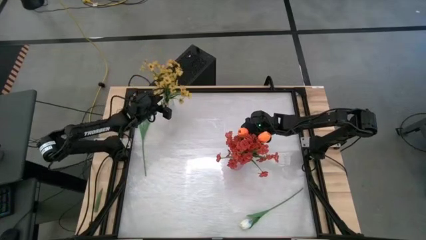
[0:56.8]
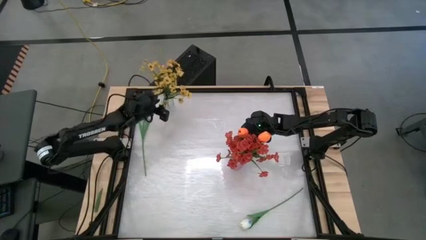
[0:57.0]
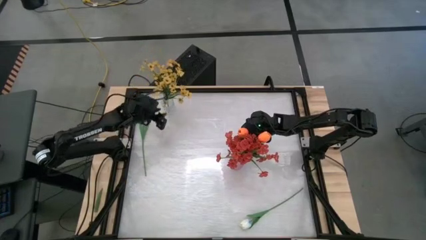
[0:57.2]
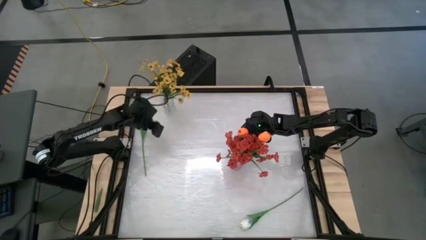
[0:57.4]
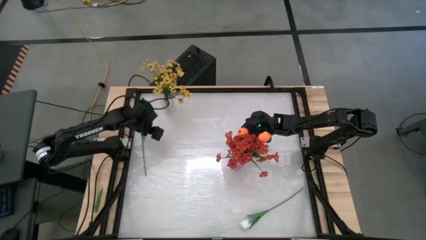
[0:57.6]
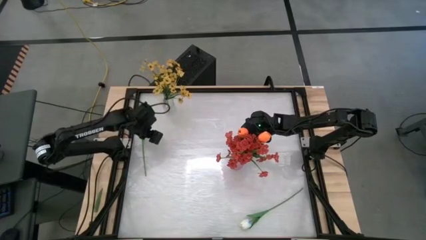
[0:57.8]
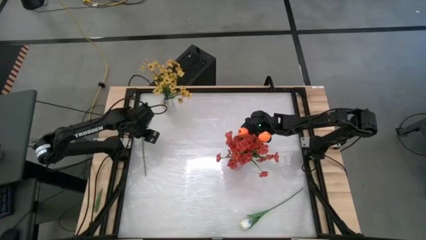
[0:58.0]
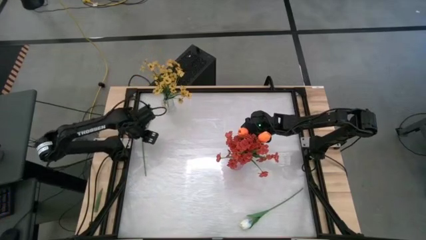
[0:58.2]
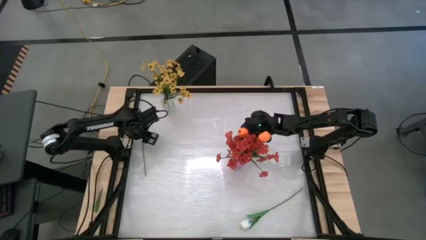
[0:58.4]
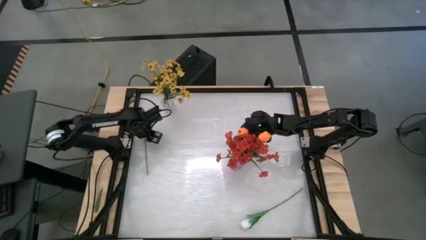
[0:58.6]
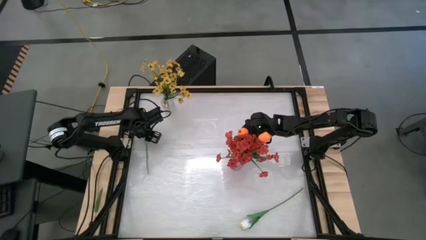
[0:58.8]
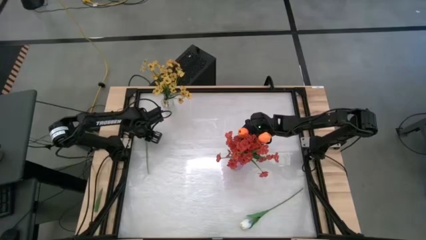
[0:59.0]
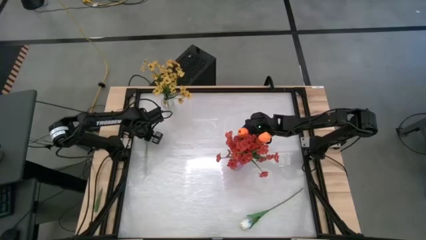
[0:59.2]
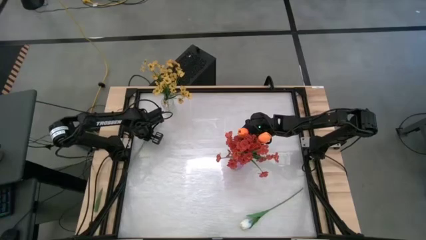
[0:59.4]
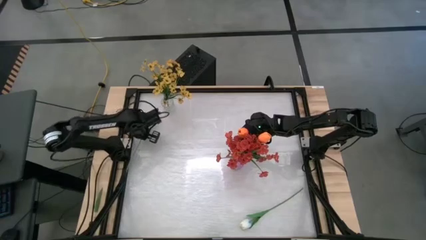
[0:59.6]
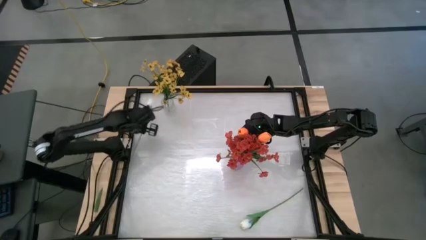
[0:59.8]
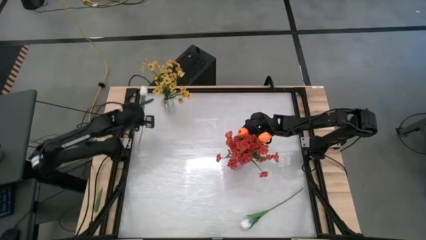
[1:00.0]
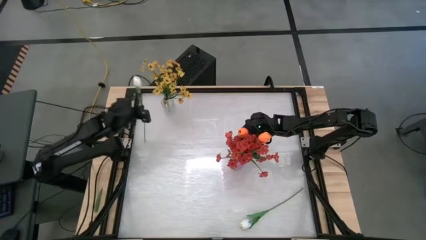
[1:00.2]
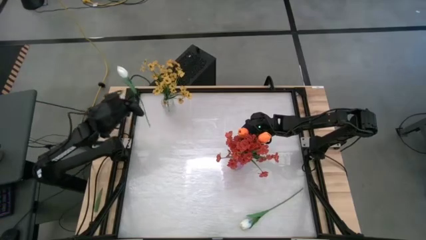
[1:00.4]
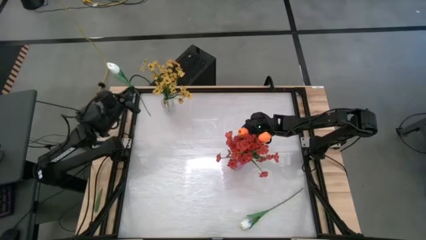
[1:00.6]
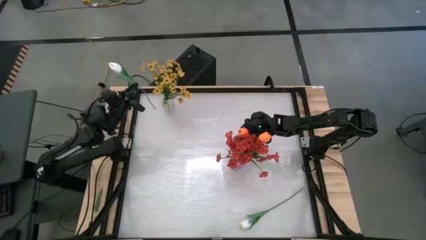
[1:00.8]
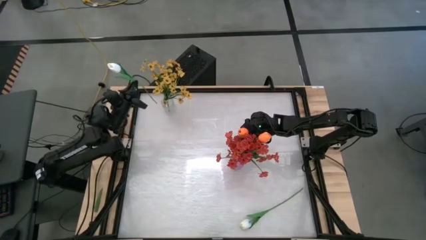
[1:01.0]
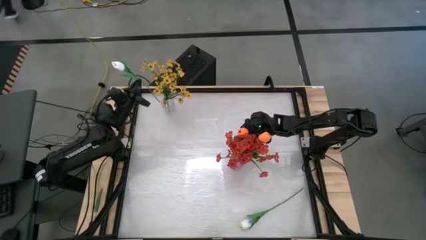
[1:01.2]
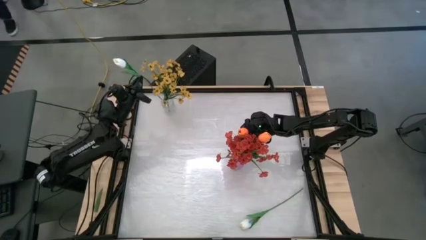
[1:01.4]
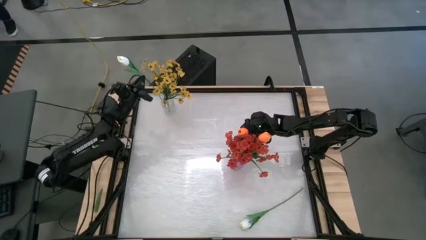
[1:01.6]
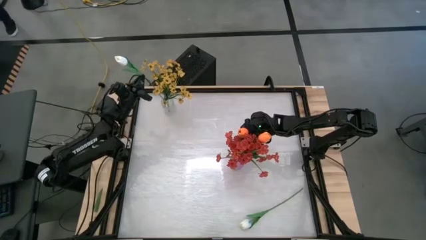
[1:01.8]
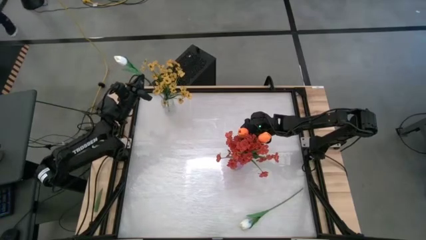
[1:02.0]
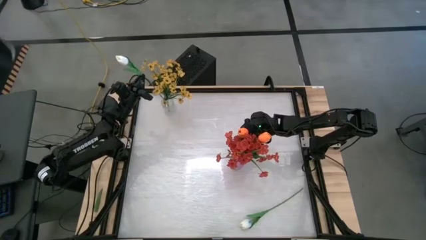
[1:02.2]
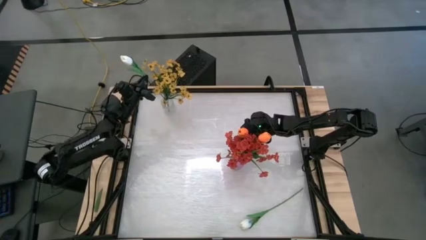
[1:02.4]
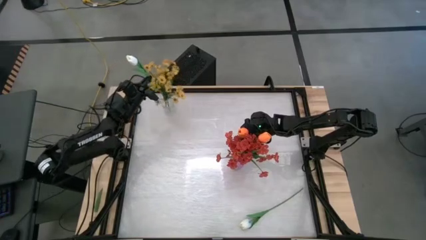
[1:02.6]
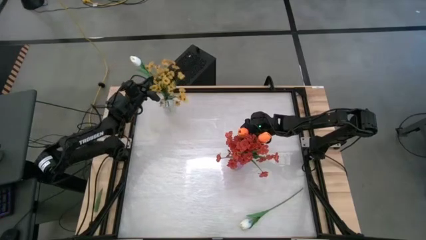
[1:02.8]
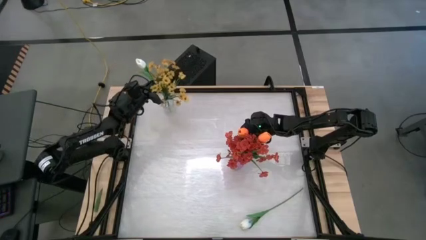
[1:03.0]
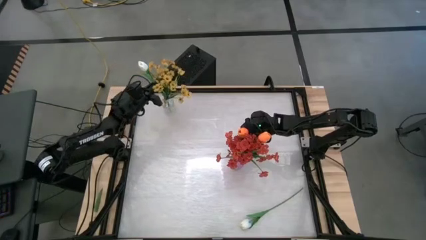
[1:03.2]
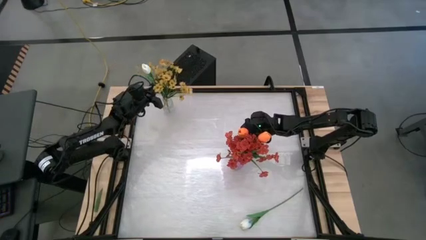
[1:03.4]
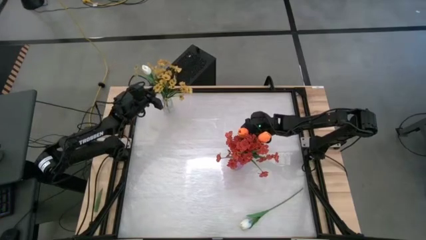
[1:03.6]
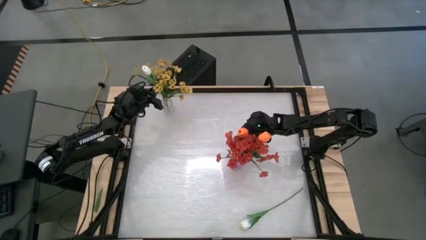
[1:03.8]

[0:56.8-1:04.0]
Task: Sort flowers into vase by color
Put the top white flower into the transparent vase

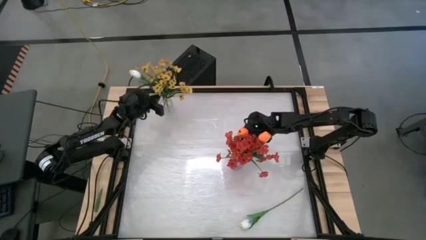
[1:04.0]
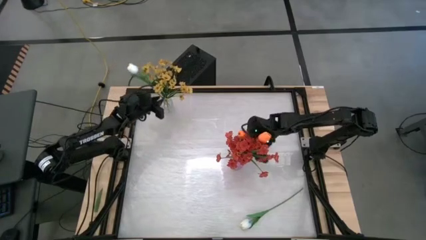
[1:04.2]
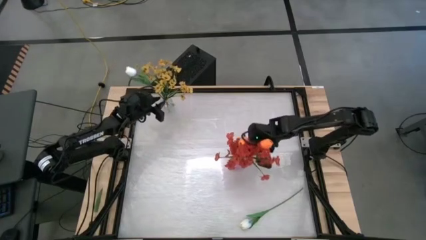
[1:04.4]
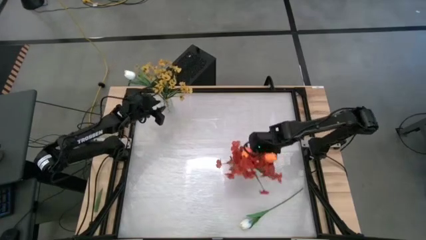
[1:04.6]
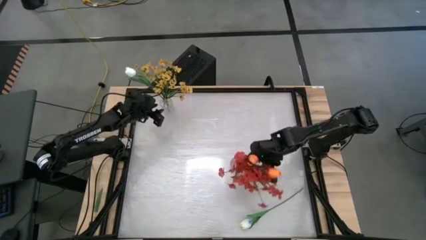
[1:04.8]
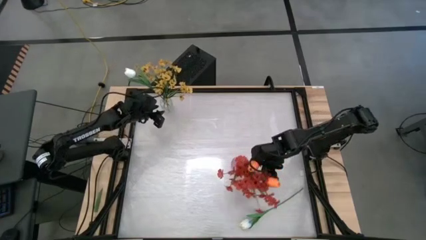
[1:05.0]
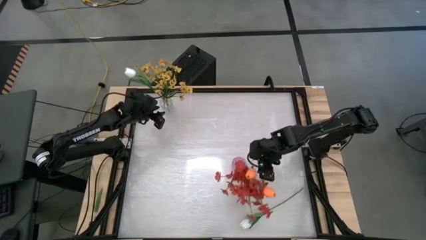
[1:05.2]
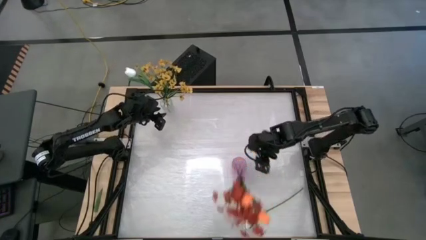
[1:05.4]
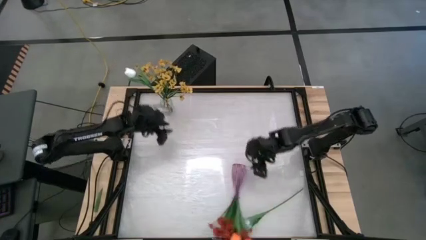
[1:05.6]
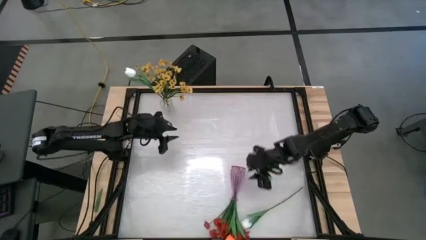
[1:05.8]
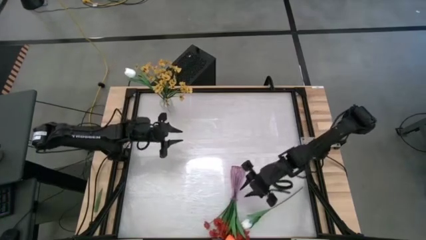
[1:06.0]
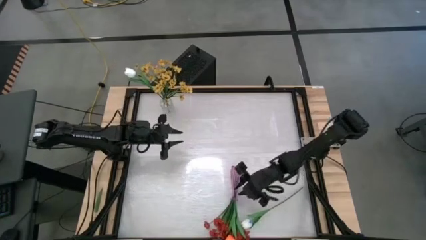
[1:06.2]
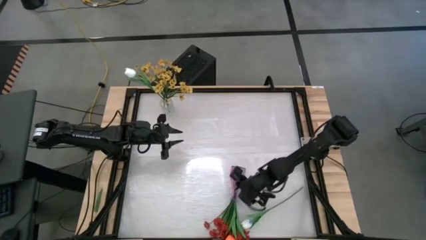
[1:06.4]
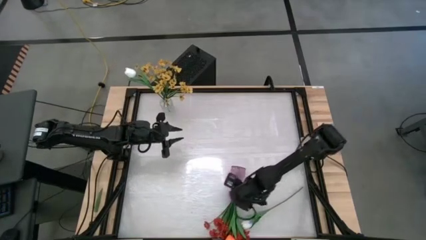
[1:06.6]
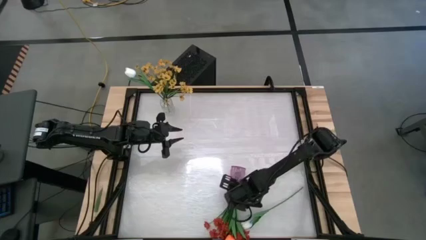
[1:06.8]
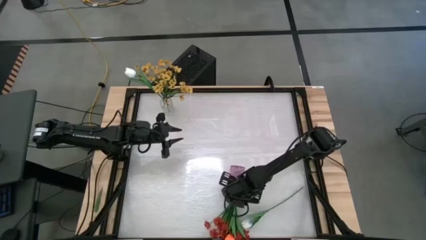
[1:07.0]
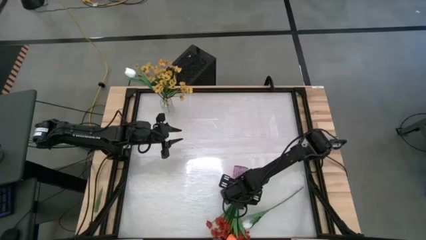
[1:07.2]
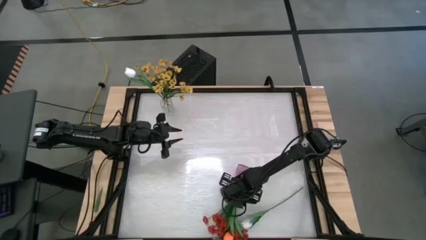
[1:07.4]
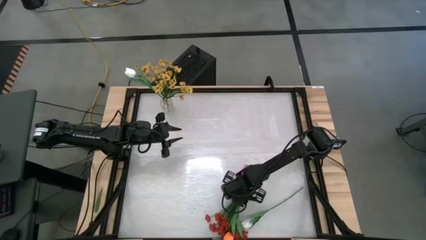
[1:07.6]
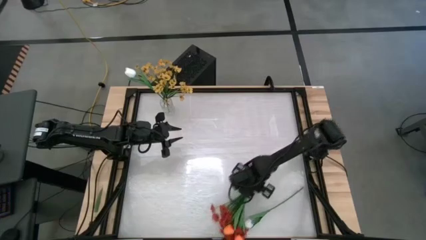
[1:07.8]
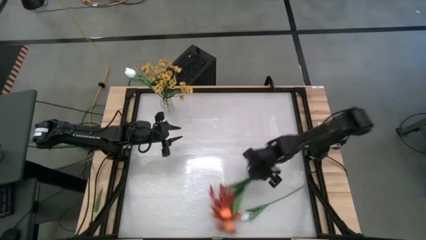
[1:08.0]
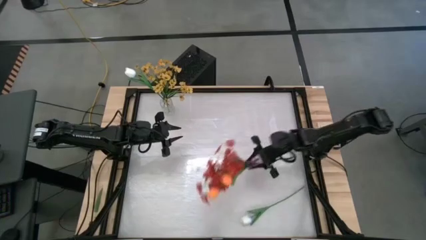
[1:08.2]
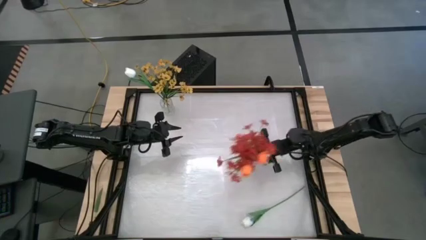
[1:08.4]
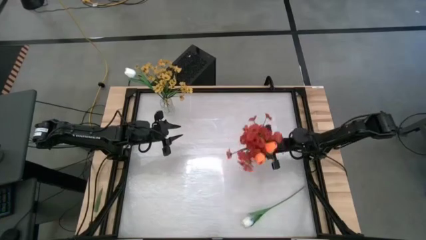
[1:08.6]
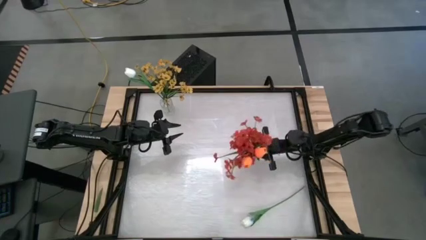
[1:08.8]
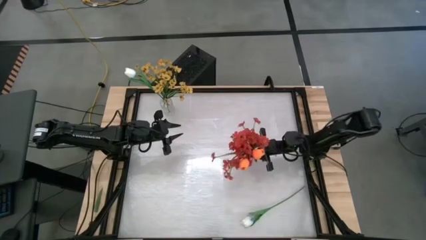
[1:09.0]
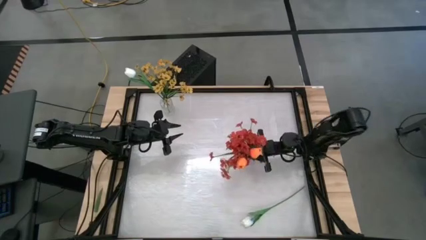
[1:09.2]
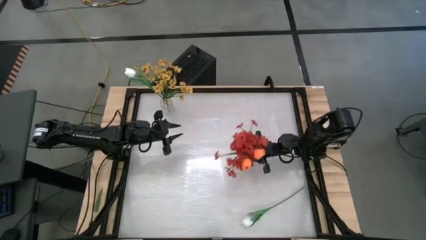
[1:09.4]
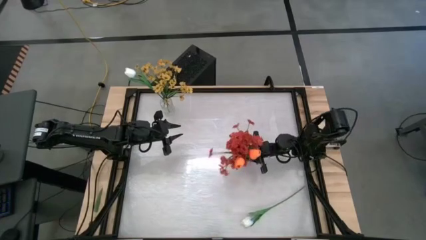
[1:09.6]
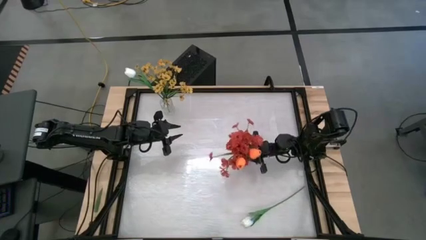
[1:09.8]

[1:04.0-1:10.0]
Adjust the violet vase
